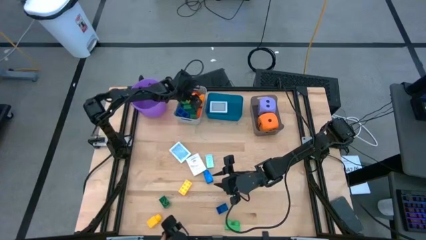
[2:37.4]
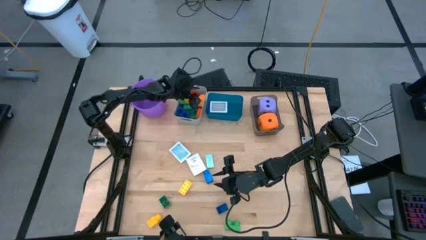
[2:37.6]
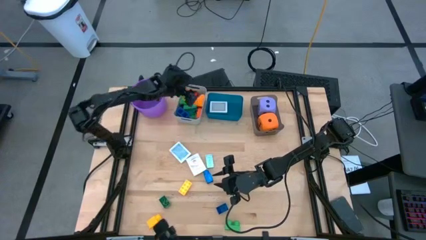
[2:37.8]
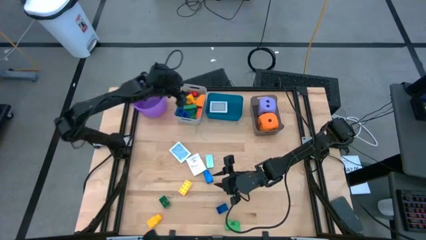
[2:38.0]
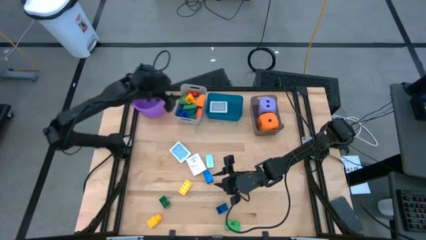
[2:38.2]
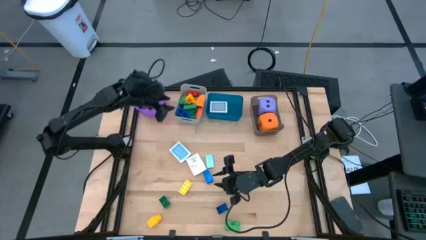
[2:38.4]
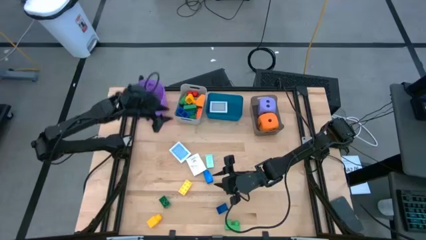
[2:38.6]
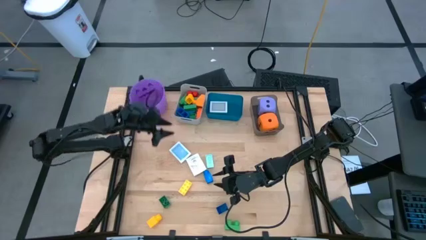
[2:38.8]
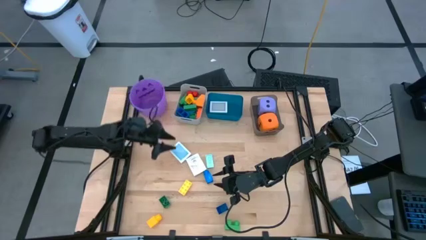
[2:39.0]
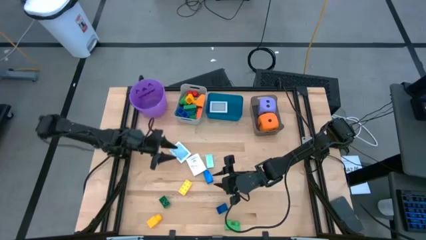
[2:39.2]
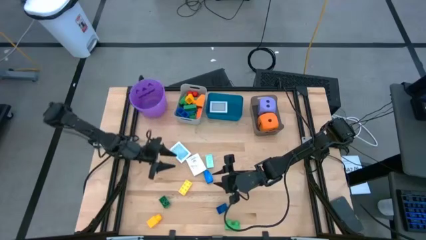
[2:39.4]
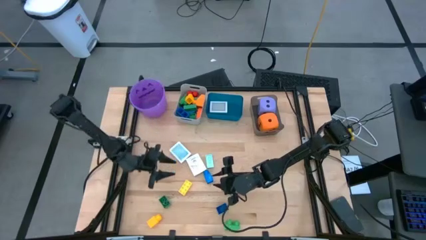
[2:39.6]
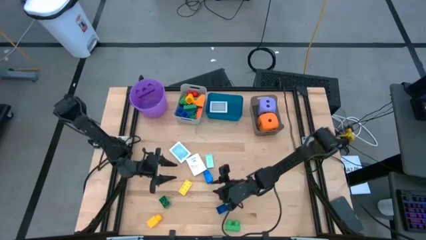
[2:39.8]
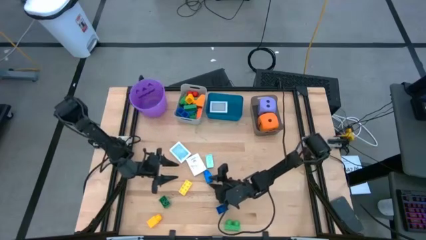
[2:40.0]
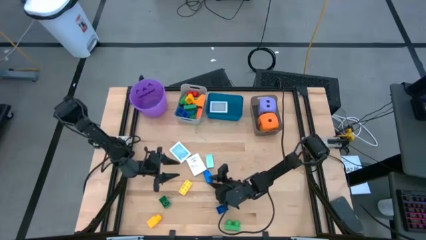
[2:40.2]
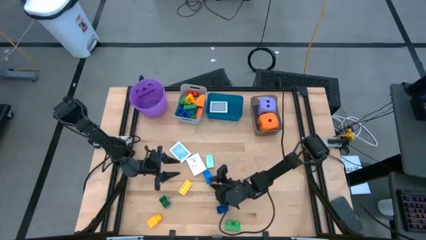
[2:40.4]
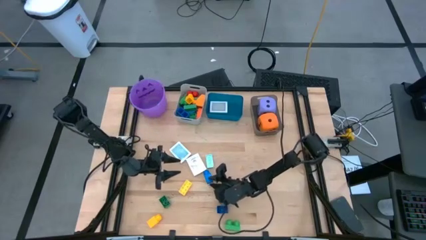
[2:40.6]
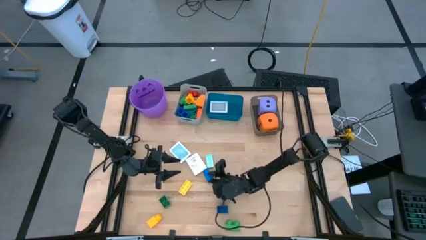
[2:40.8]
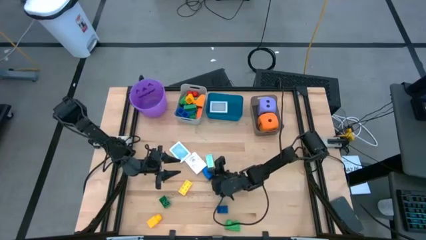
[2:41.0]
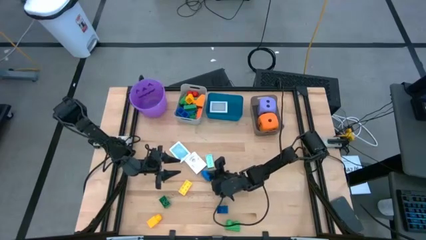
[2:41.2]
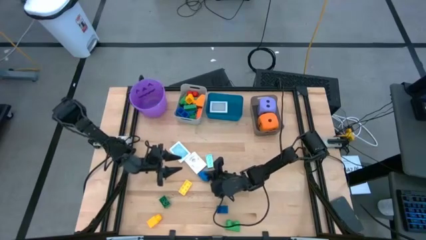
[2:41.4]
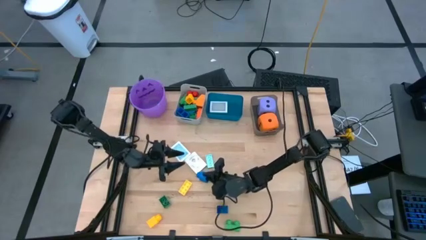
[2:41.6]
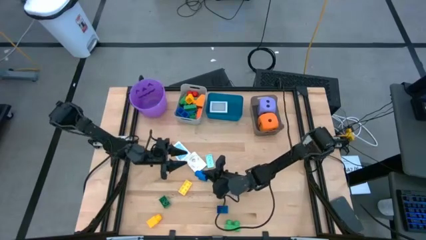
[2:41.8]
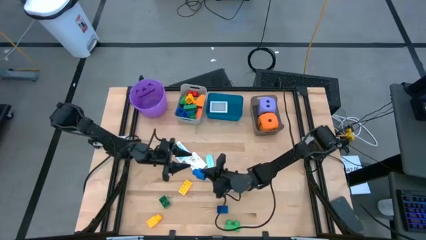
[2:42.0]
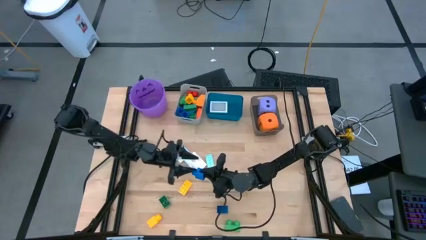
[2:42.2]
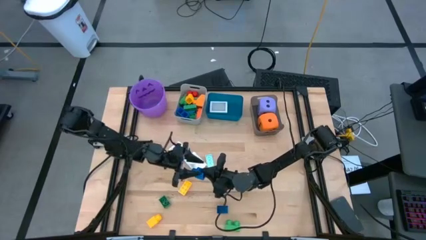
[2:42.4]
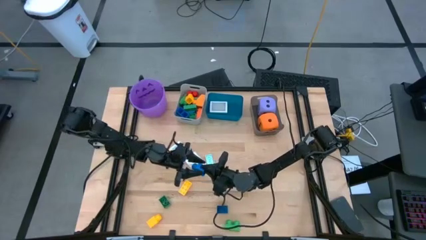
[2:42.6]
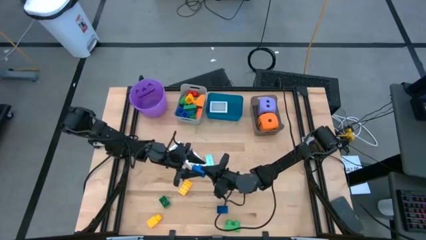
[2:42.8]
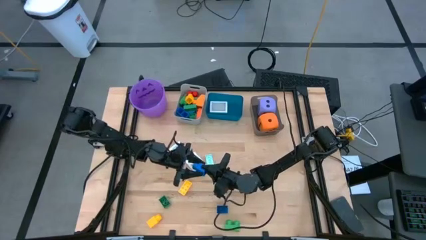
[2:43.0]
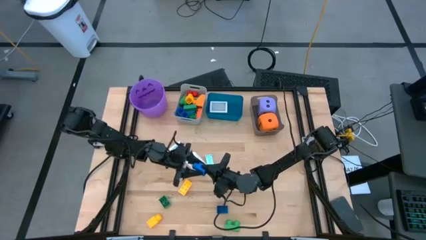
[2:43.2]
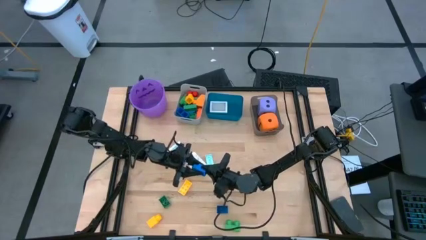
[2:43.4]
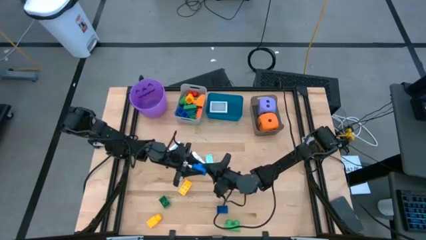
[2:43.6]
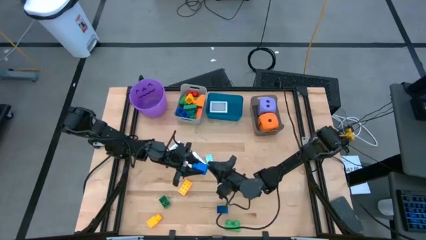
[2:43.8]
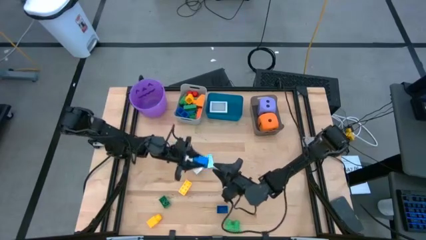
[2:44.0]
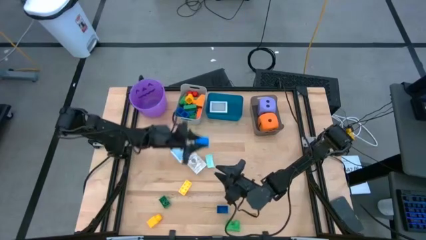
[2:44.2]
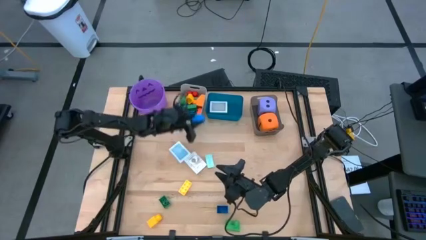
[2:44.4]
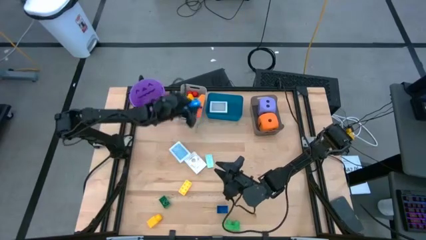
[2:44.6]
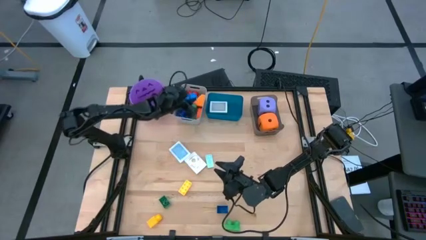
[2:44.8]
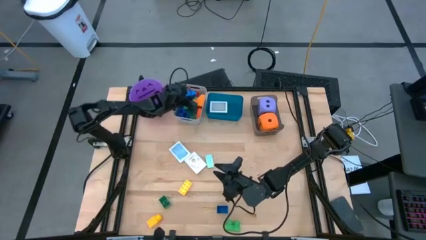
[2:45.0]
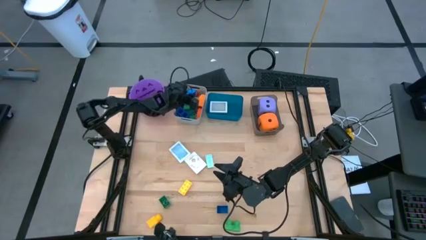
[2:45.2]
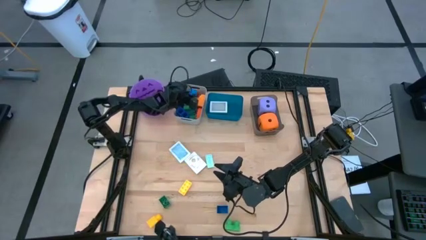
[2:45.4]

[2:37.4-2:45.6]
Task: Pick & Place Toys
Put the blue game piece into the gray bin

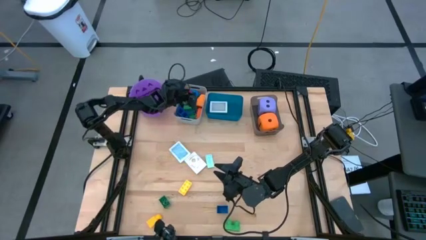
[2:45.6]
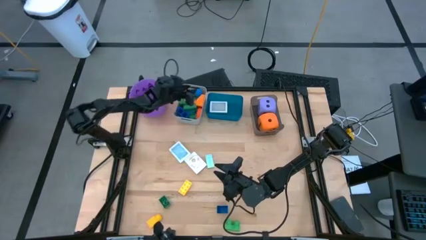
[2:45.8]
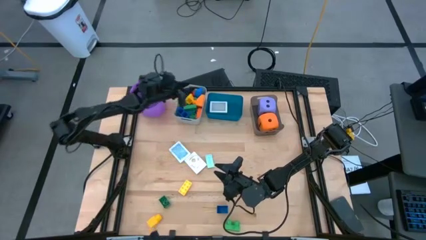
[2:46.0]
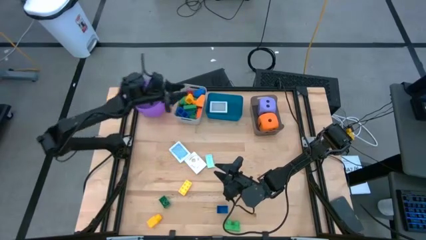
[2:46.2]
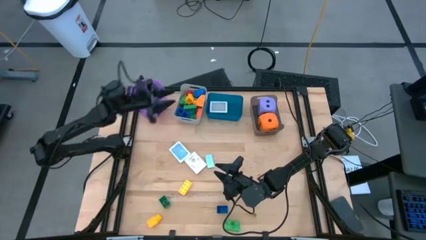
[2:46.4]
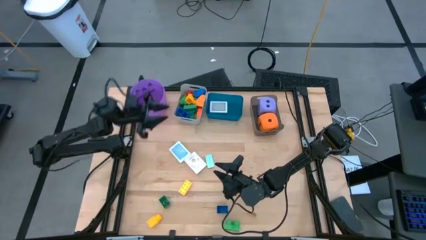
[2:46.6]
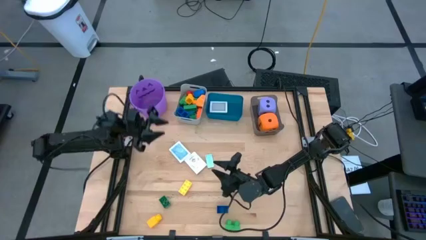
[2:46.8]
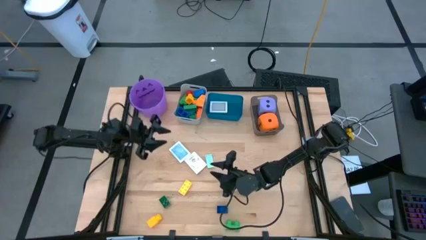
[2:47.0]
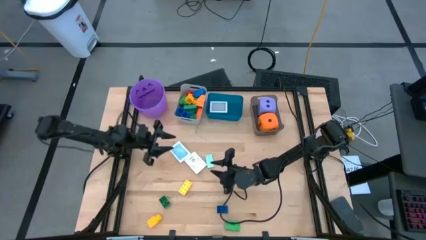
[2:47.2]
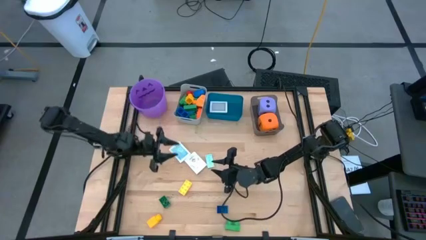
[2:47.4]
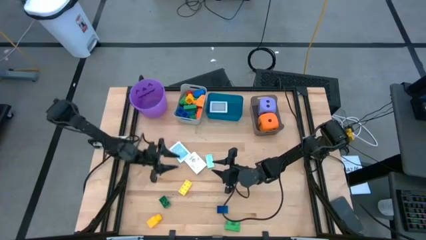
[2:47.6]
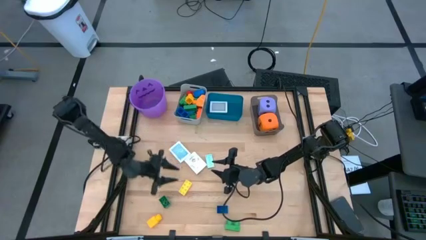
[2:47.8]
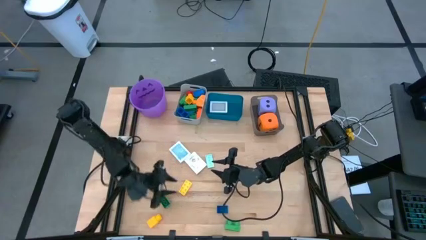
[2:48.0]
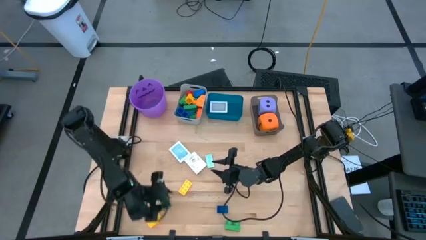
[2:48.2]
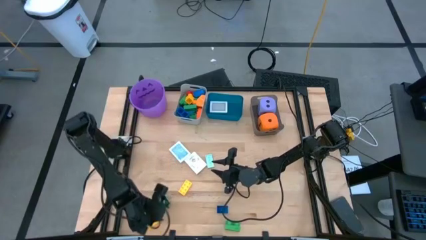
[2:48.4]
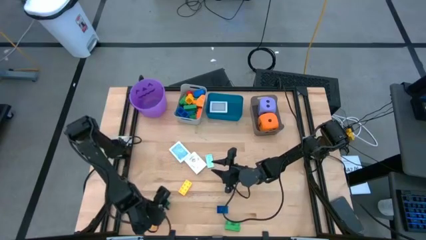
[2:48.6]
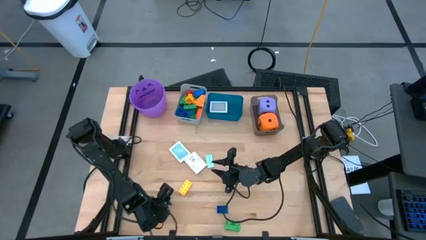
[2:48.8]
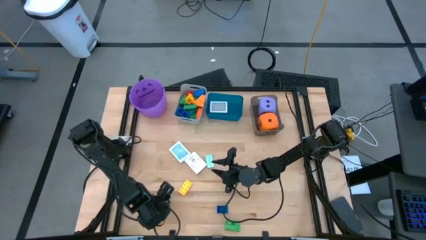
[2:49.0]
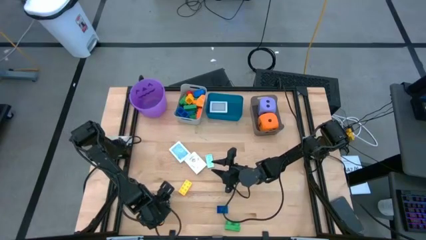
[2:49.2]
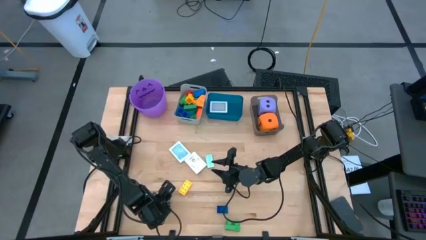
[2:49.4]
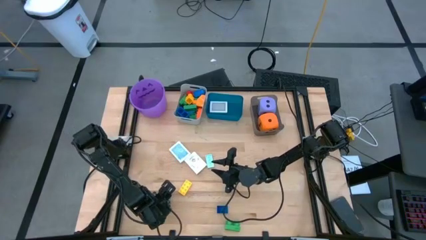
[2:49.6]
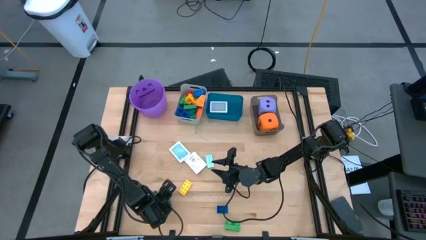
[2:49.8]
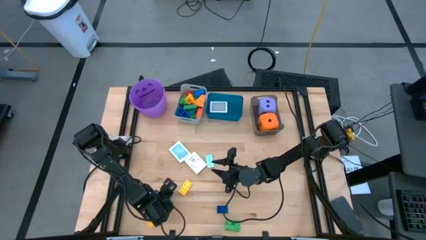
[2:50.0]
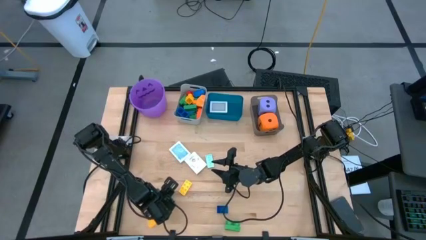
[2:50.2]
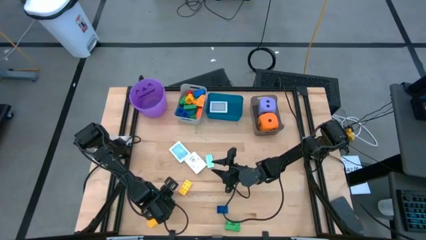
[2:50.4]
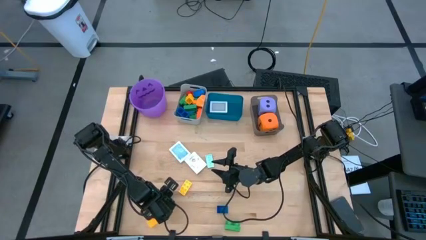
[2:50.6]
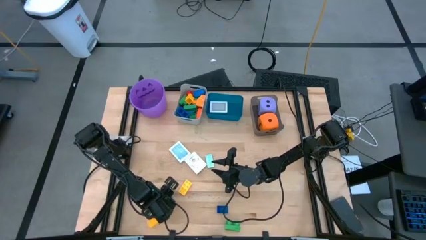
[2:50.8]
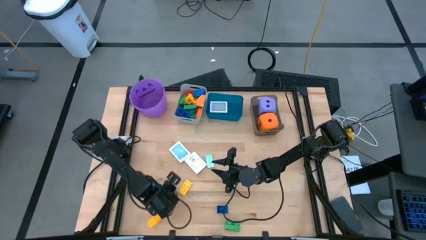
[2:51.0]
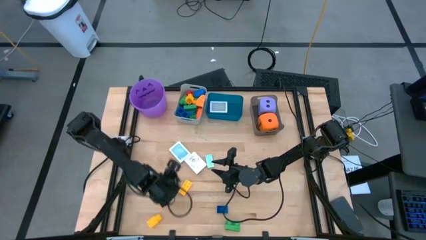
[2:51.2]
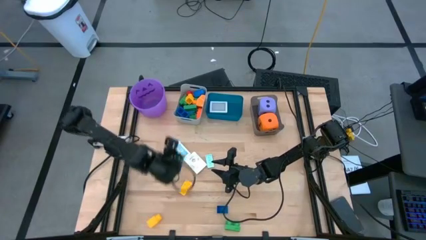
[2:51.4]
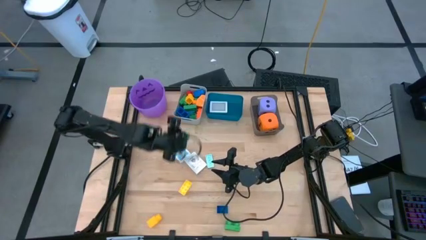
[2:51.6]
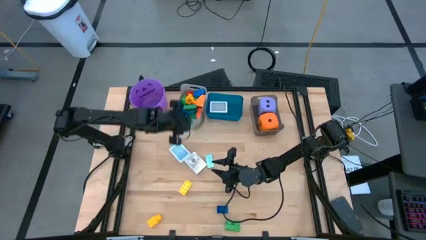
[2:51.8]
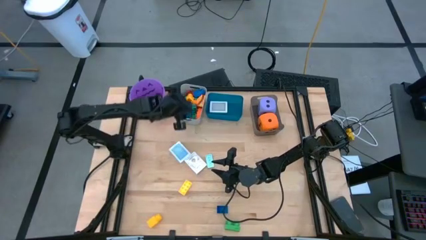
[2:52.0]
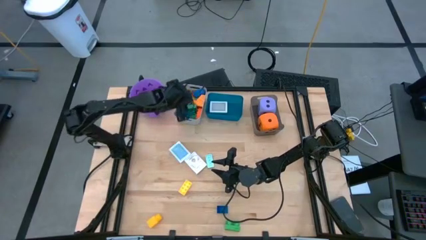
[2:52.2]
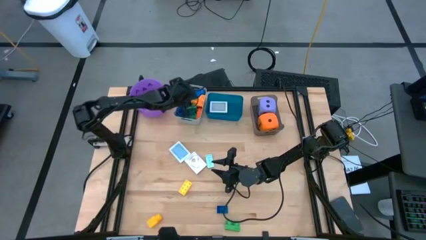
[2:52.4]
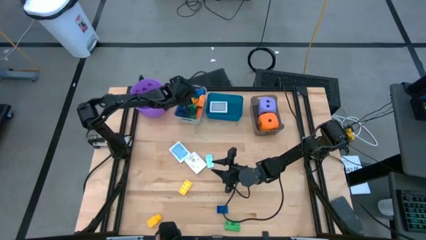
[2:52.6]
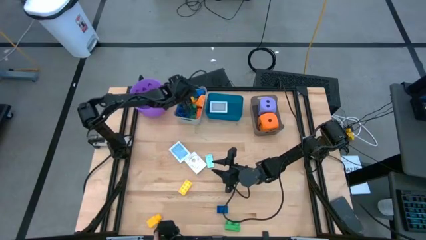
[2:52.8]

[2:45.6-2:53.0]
Put the dark green game piece into the gray bin
